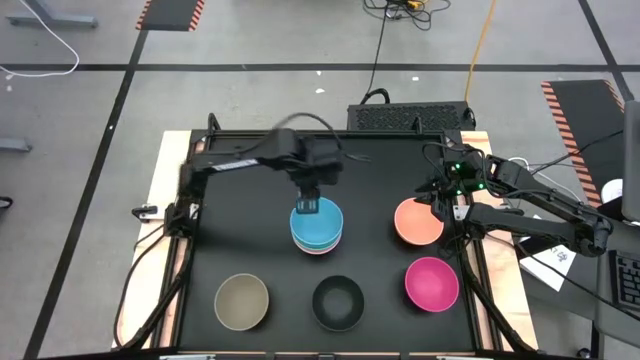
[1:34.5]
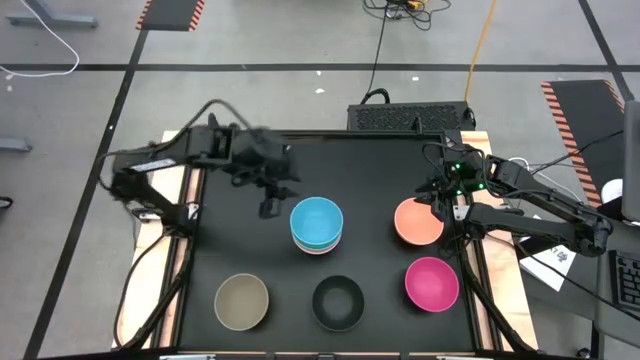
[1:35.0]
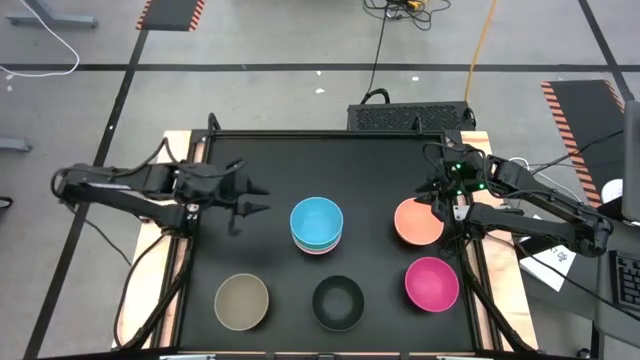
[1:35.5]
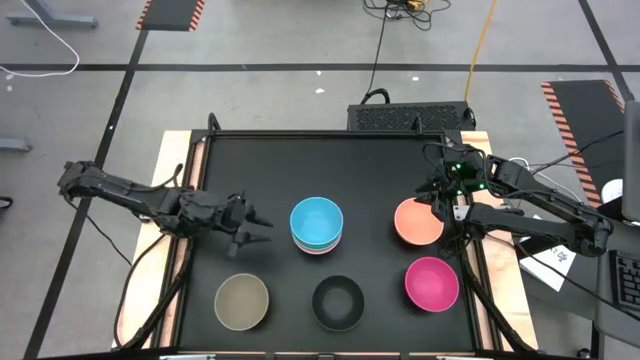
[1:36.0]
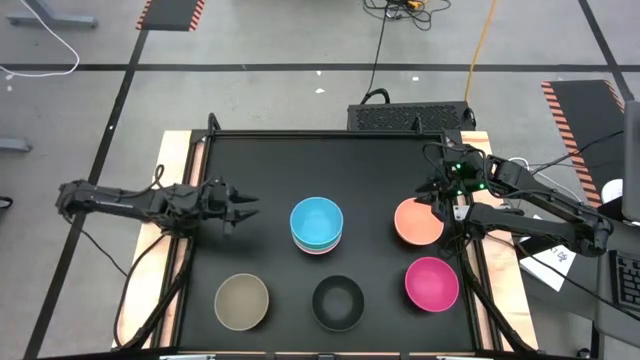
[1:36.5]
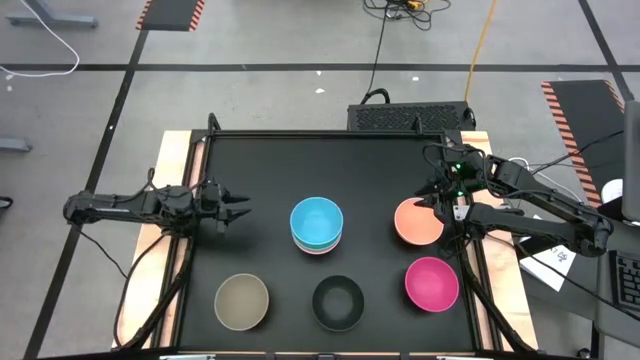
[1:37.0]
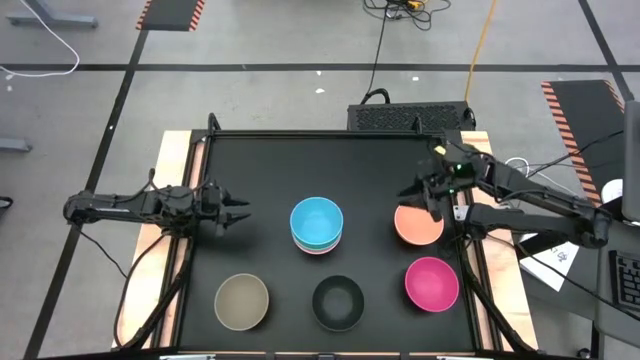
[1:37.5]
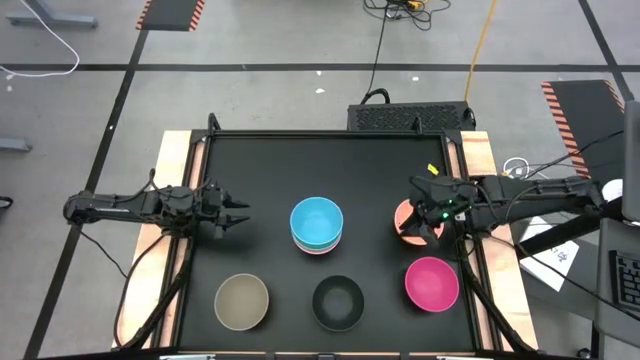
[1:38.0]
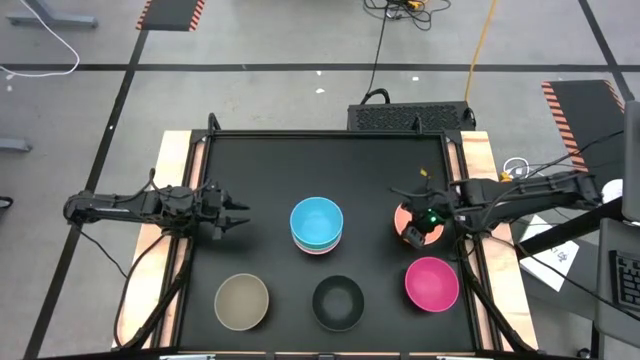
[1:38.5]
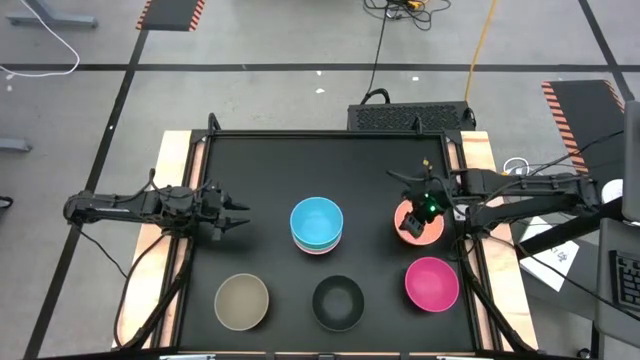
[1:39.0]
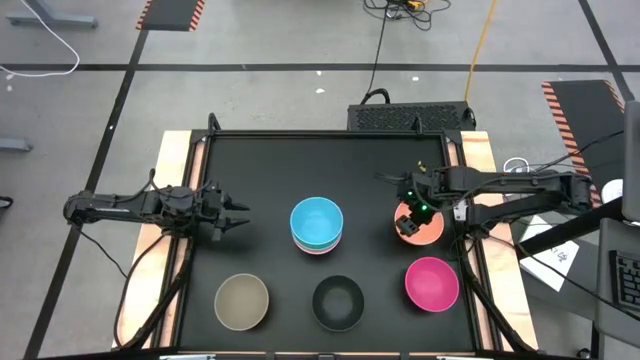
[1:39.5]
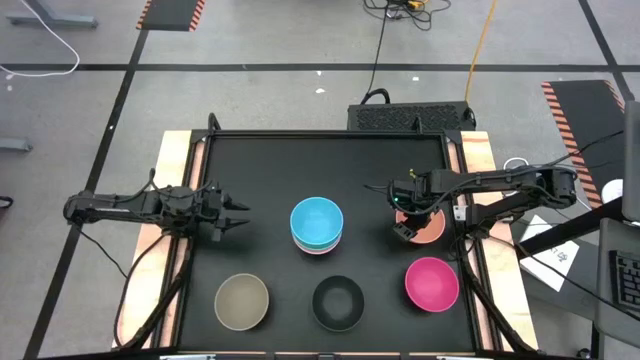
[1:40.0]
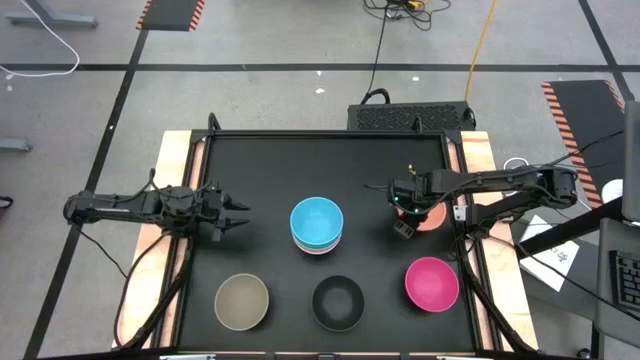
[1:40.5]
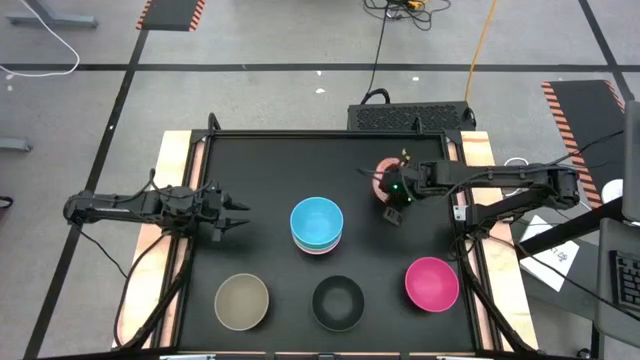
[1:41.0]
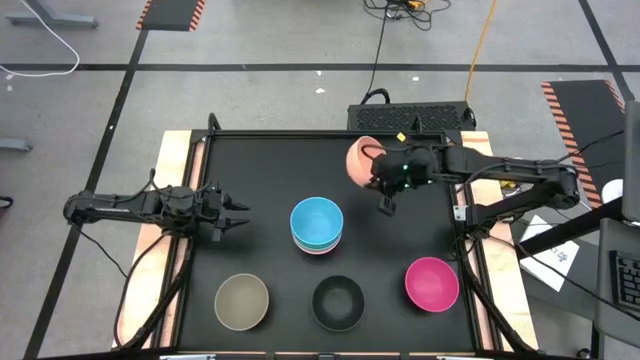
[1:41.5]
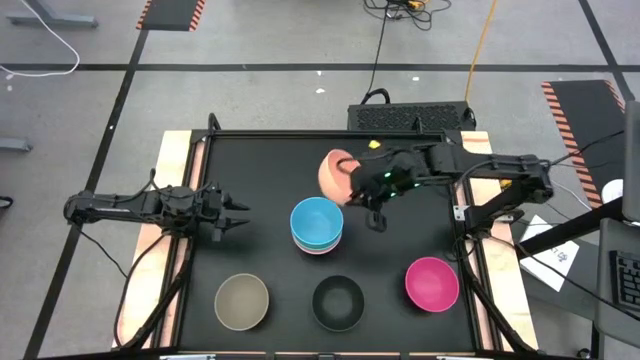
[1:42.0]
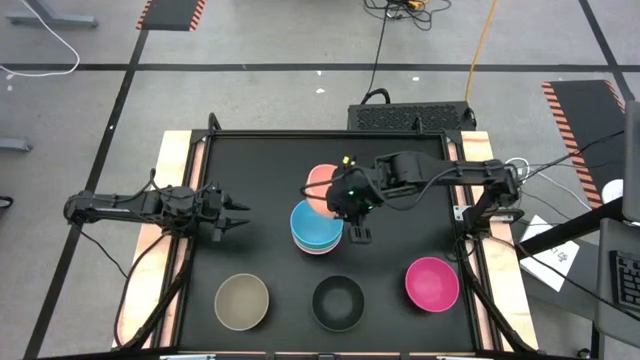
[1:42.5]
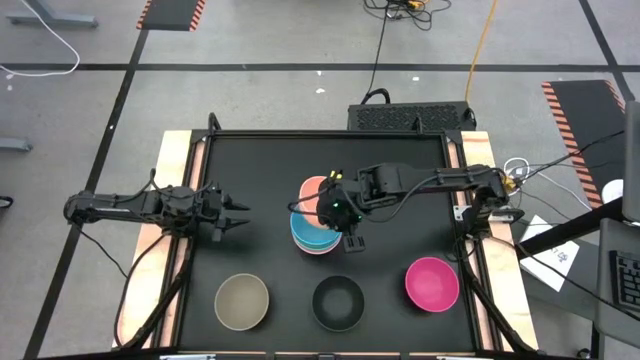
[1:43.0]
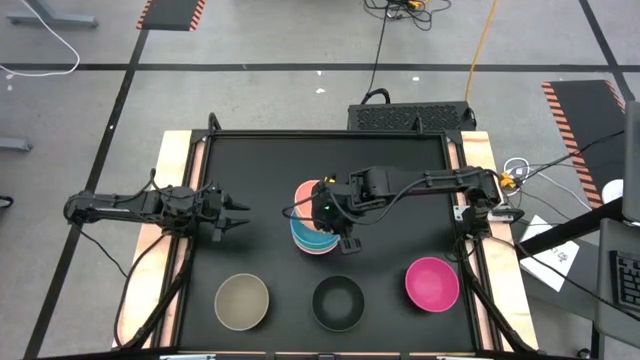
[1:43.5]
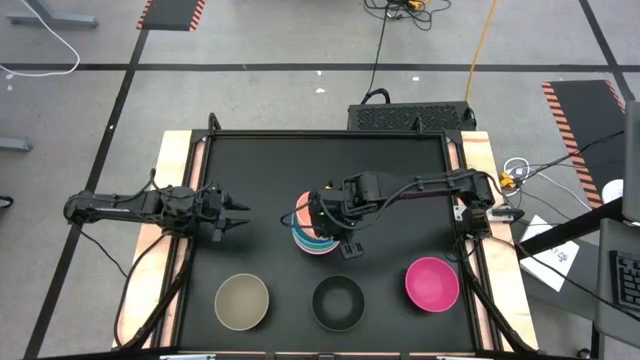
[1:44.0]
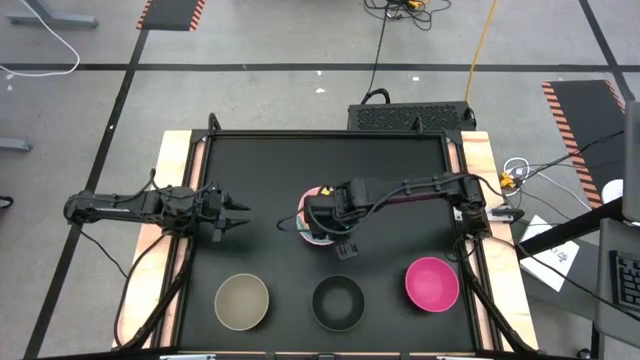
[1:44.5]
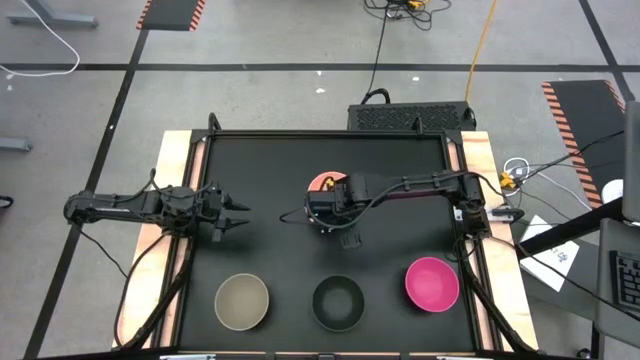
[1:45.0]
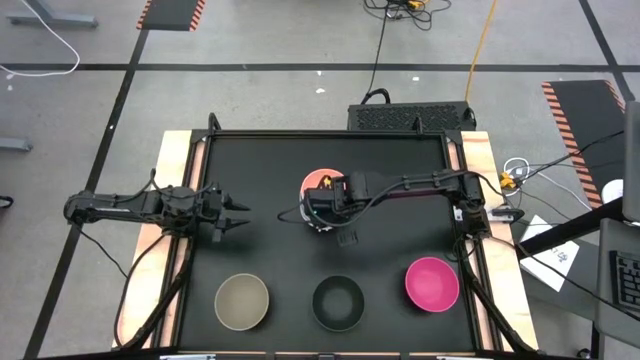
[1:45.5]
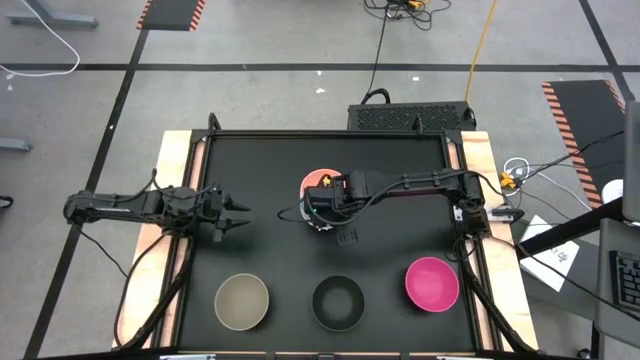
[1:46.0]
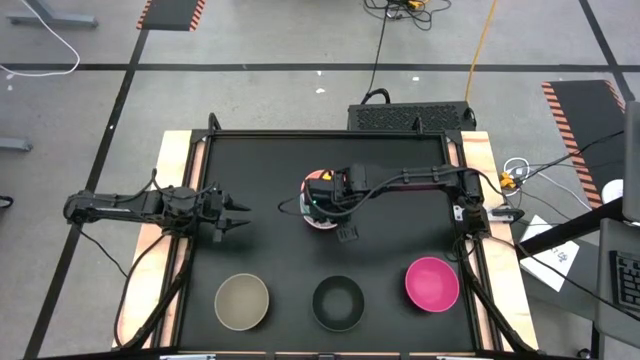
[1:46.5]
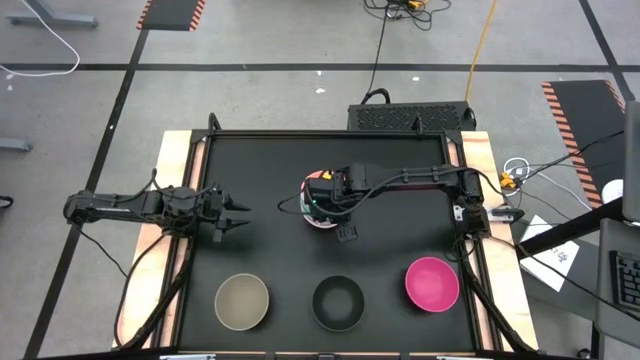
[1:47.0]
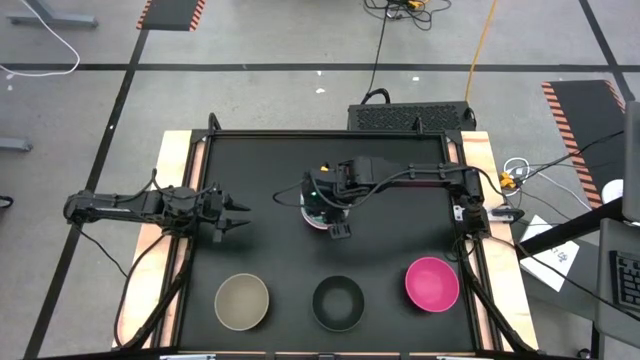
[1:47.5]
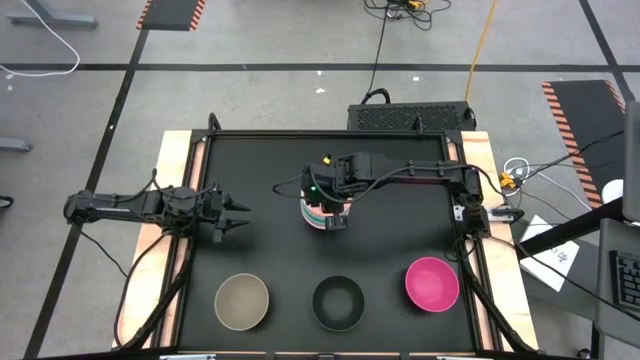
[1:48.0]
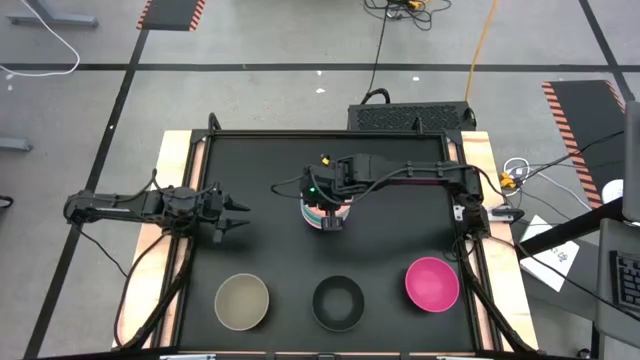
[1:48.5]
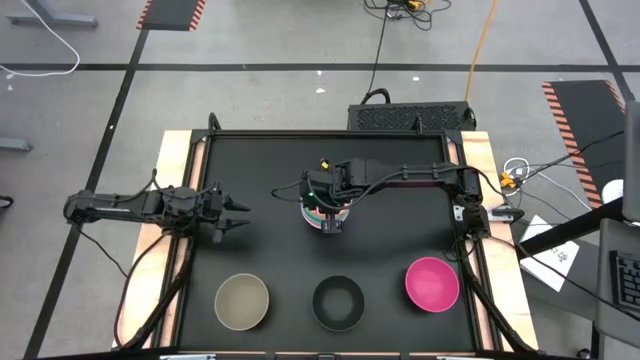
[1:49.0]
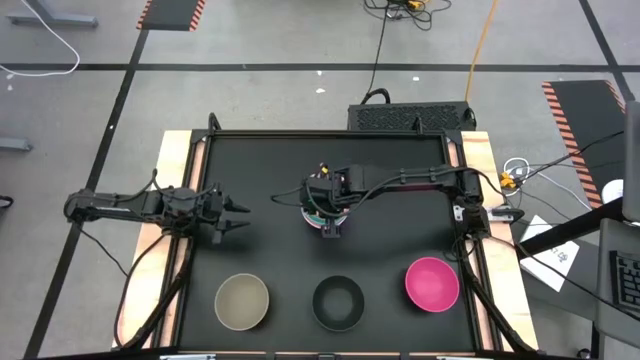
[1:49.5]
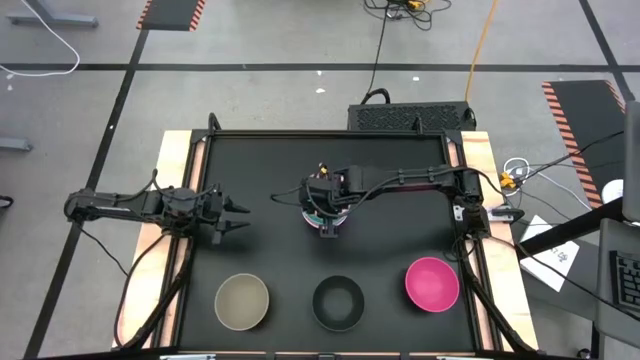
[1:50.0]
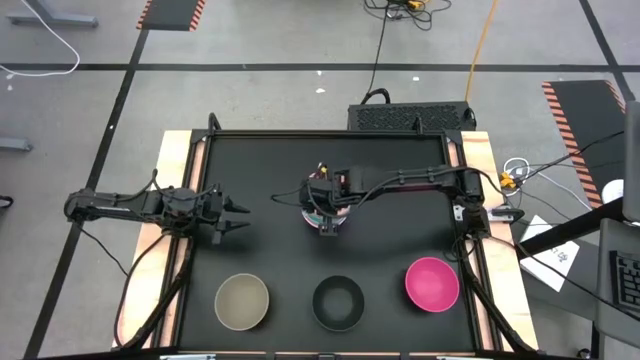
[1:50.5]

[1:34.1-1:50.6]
Task: Nest bowls inside each other
Stack the light orange bowl on top of the blue bowl

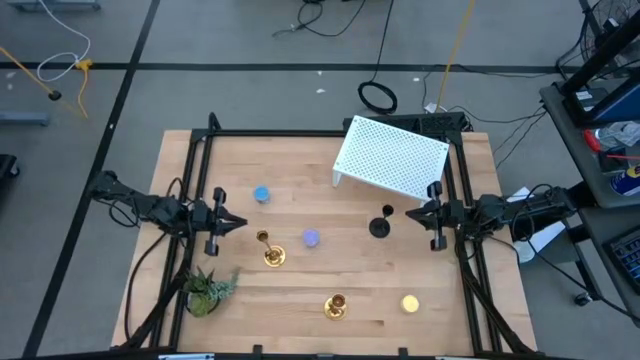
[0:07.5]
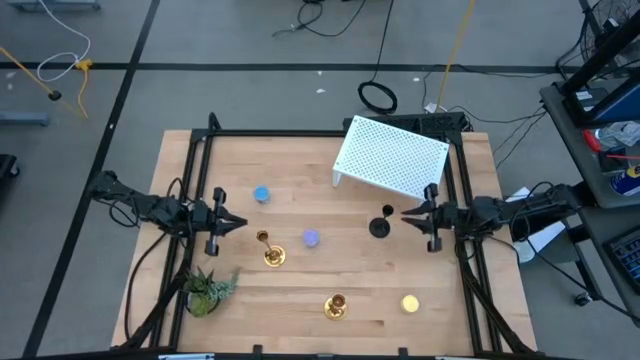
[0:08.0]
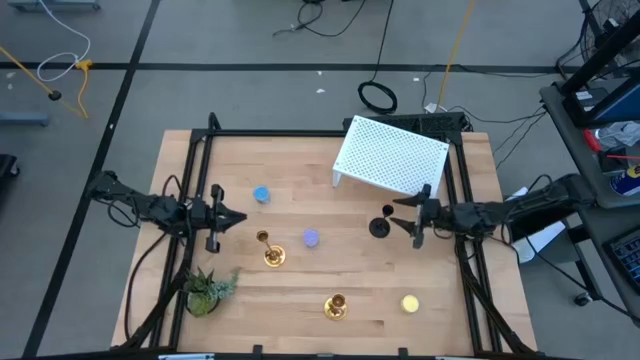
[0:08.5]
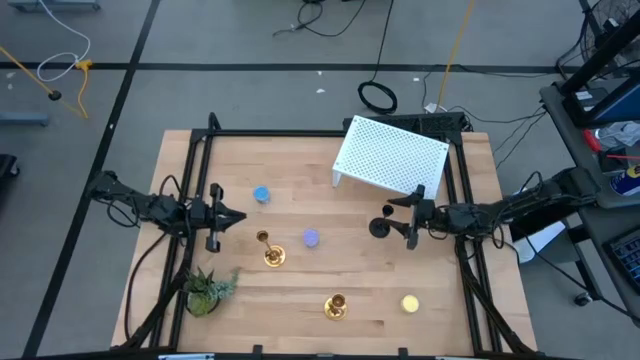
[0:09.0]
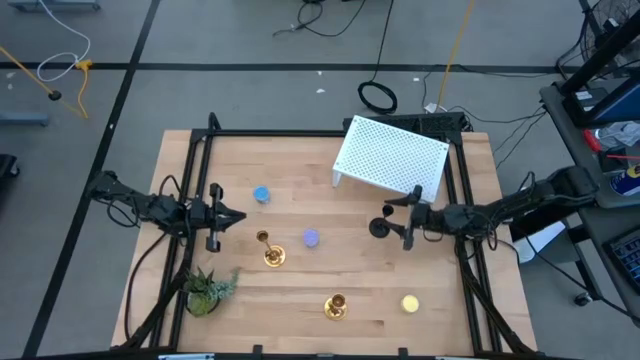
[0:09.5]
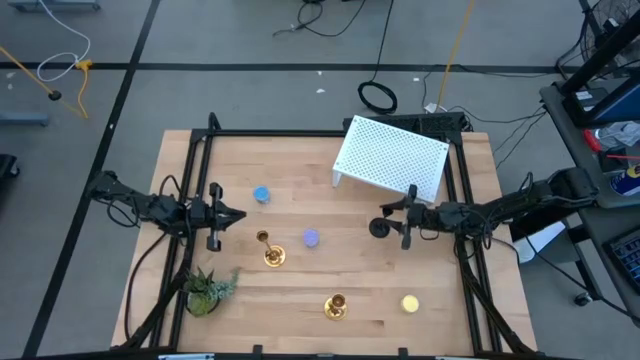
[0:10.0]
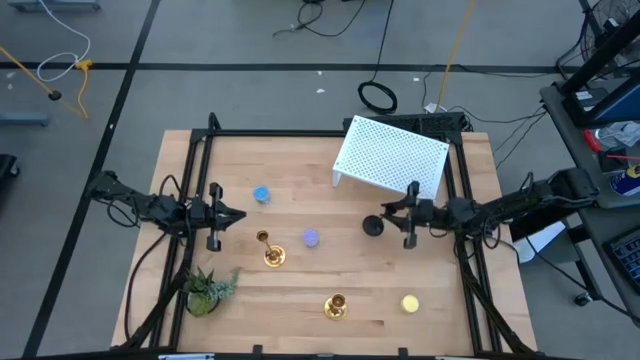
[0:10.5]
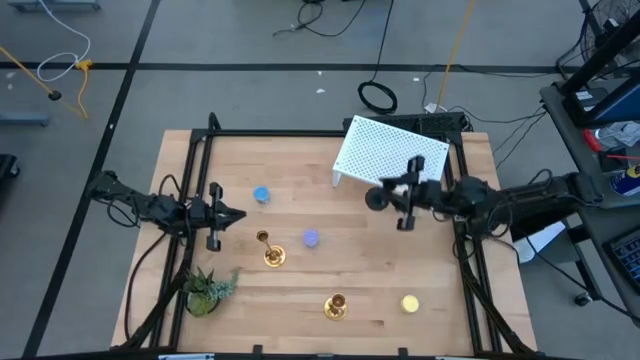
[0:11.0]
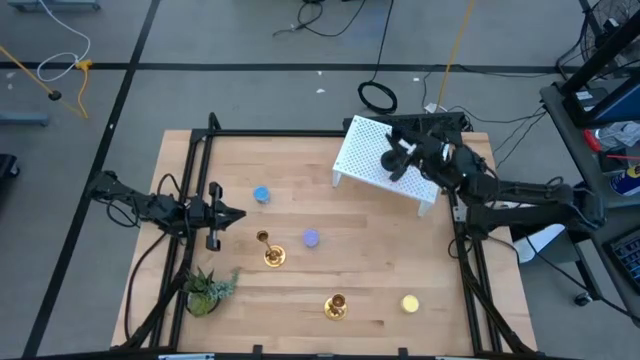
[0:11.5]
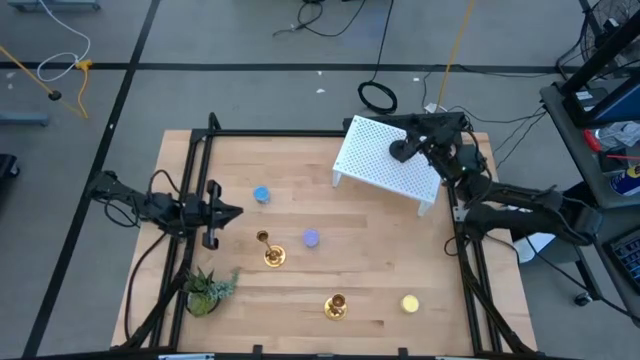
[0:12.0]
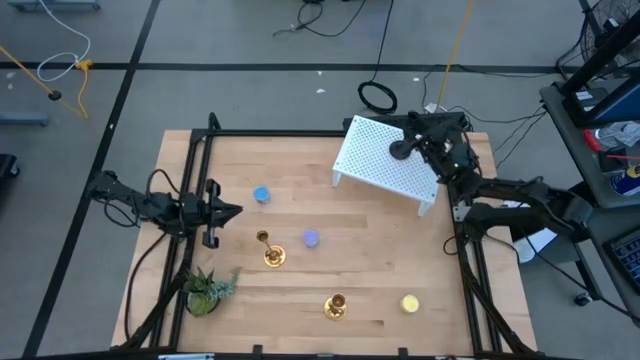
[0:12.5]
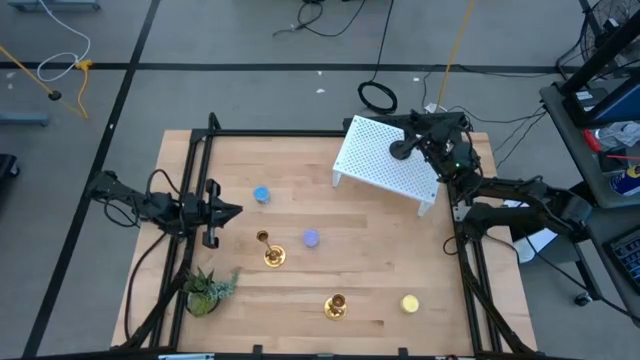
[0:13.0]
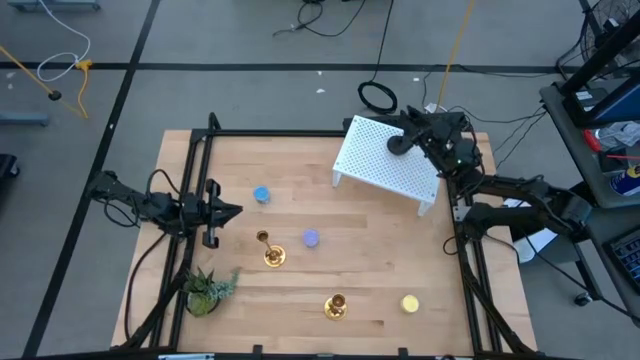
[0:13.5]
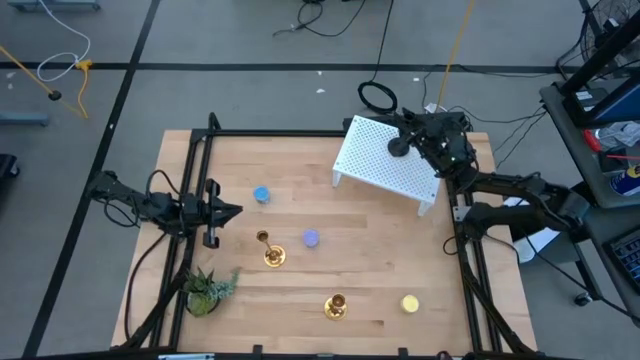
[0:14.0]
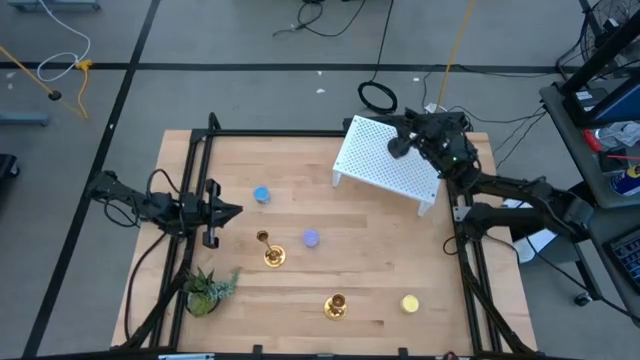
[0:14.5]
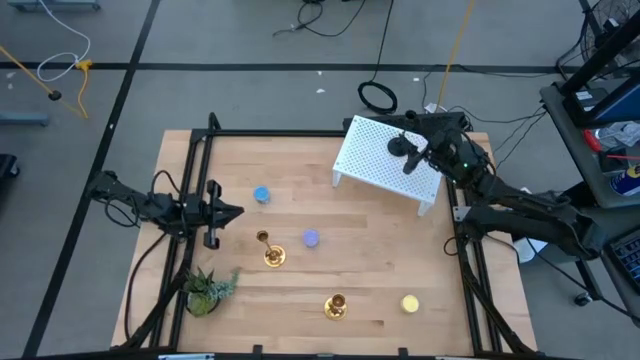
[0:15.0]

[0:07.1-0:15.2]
Task: Pick & Place candle stick holders
Put the black candle holder on the shelf
